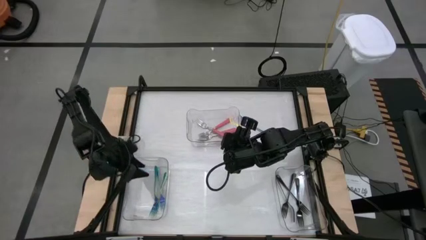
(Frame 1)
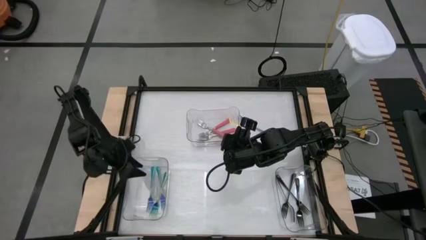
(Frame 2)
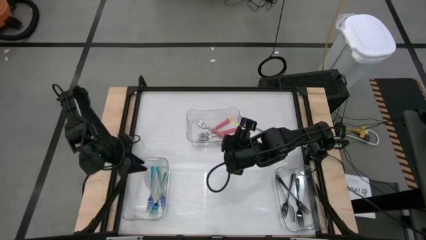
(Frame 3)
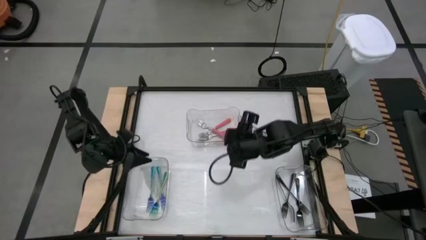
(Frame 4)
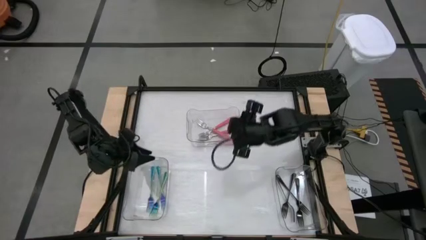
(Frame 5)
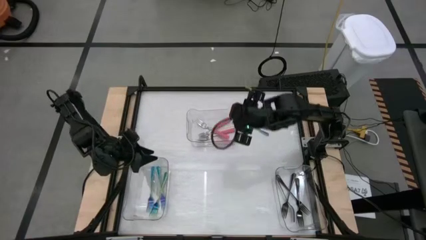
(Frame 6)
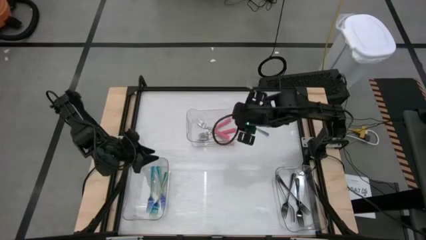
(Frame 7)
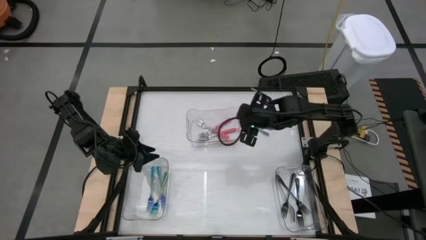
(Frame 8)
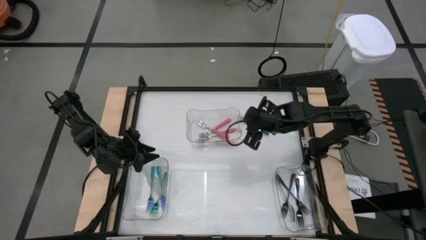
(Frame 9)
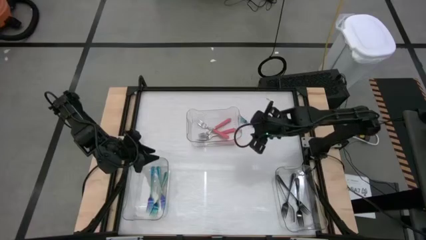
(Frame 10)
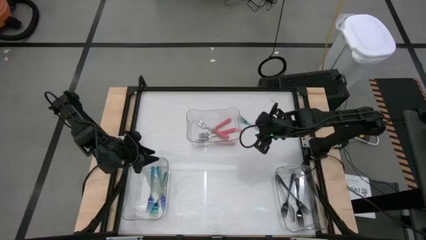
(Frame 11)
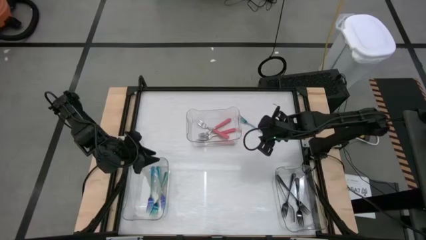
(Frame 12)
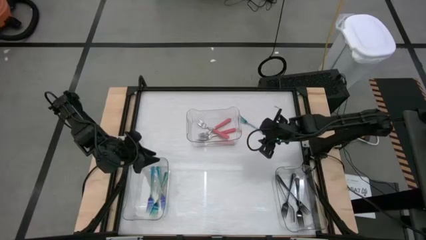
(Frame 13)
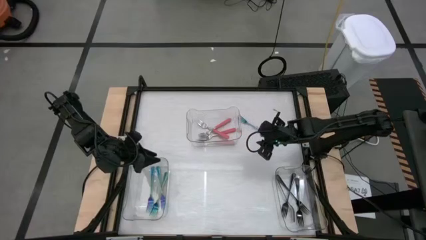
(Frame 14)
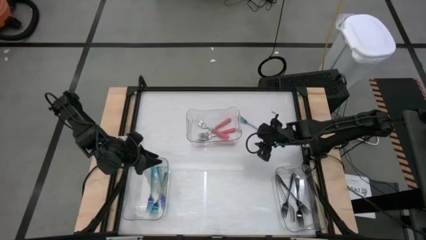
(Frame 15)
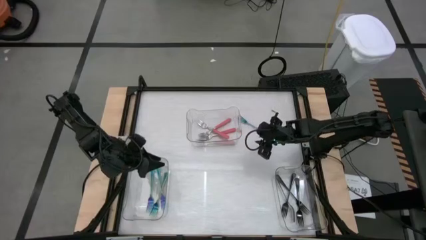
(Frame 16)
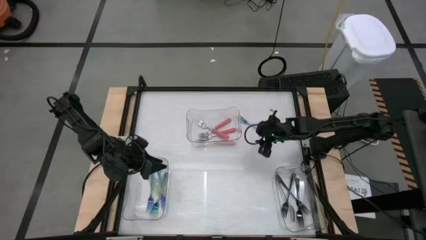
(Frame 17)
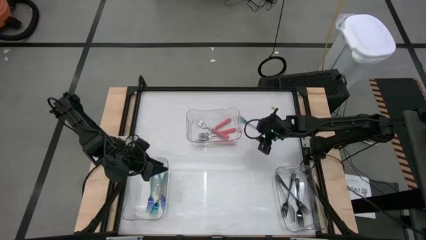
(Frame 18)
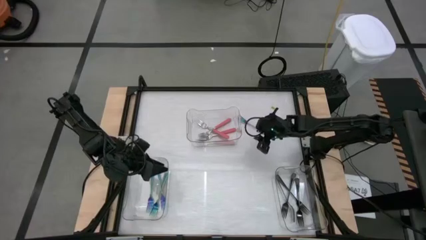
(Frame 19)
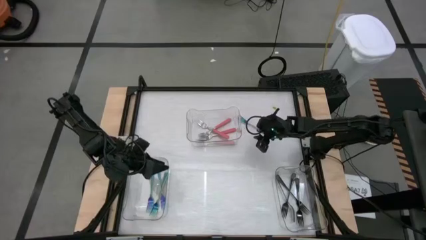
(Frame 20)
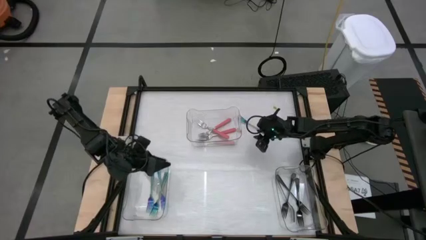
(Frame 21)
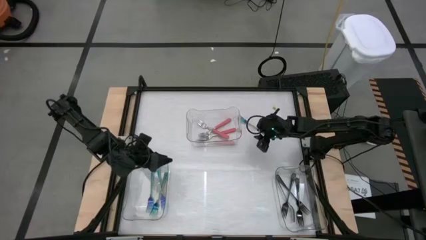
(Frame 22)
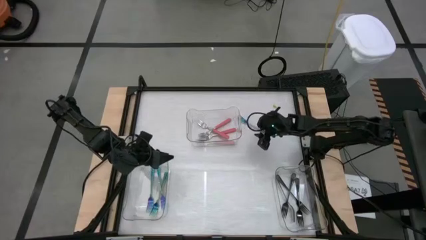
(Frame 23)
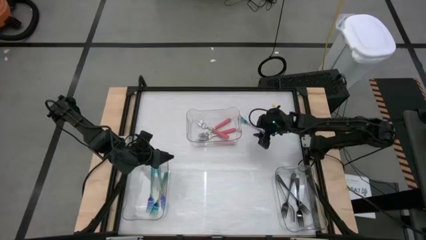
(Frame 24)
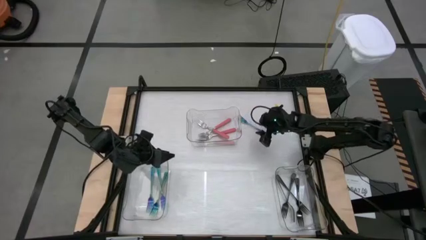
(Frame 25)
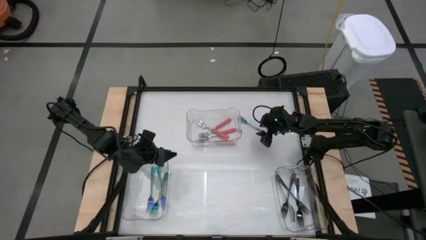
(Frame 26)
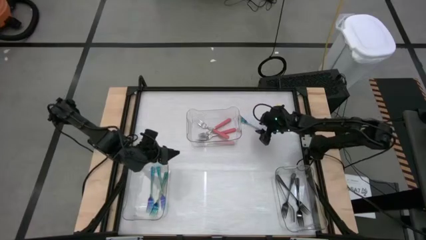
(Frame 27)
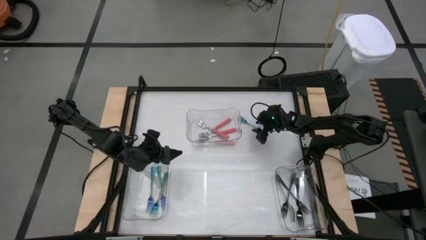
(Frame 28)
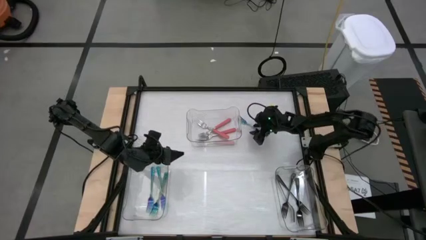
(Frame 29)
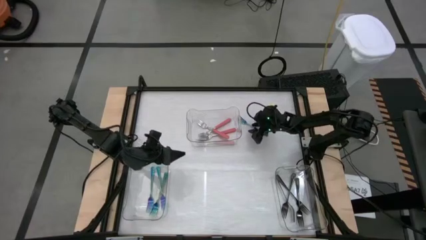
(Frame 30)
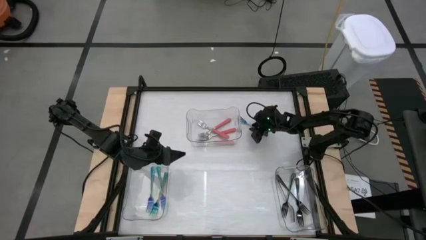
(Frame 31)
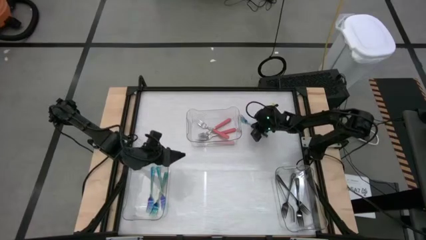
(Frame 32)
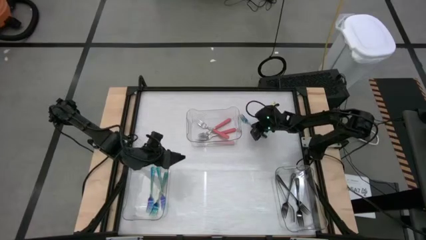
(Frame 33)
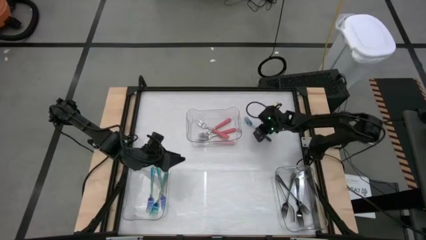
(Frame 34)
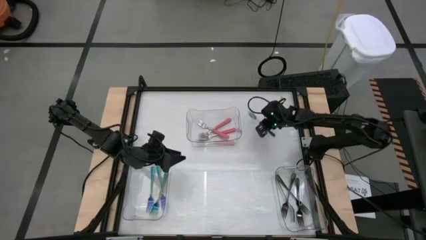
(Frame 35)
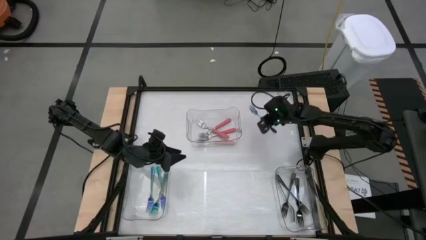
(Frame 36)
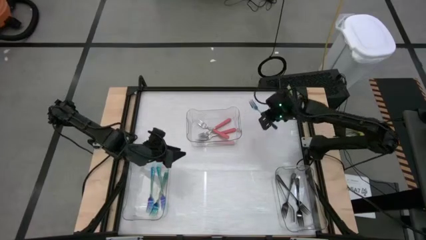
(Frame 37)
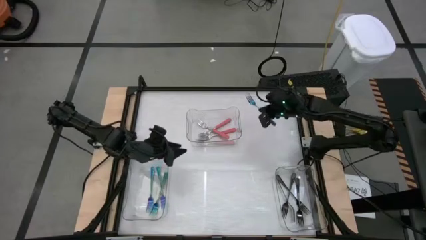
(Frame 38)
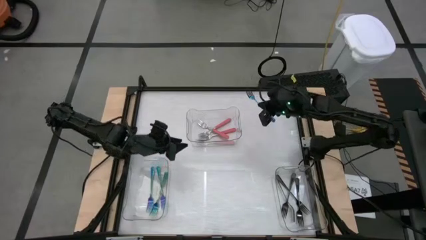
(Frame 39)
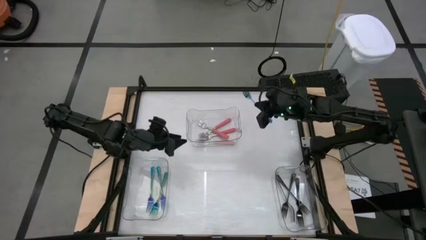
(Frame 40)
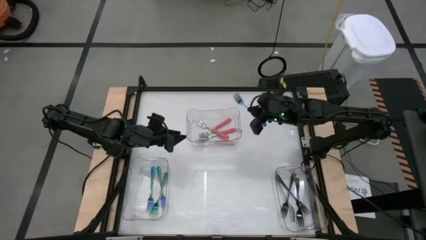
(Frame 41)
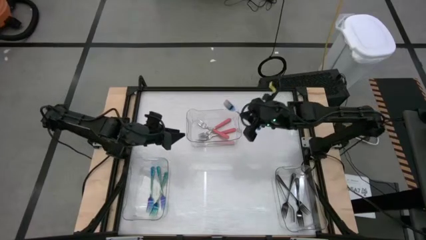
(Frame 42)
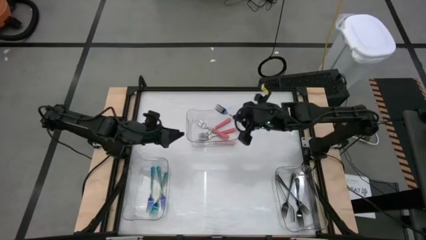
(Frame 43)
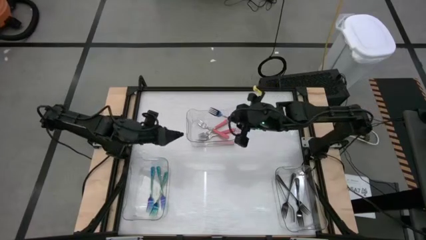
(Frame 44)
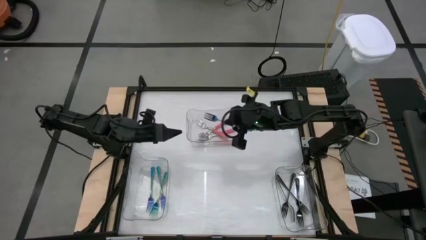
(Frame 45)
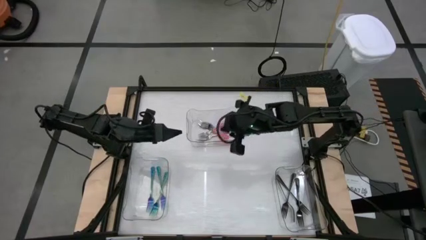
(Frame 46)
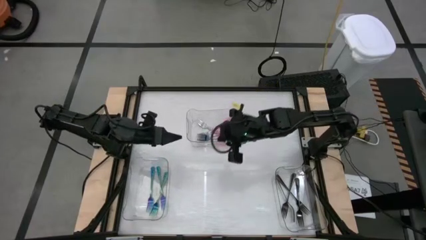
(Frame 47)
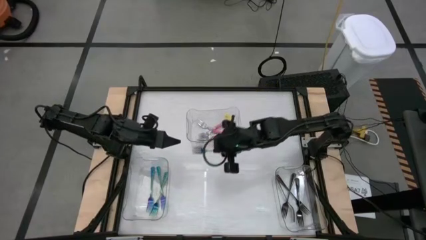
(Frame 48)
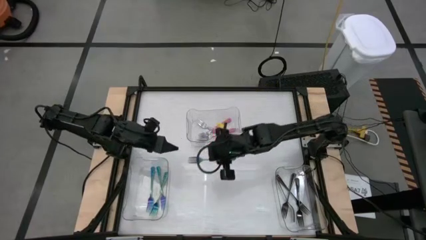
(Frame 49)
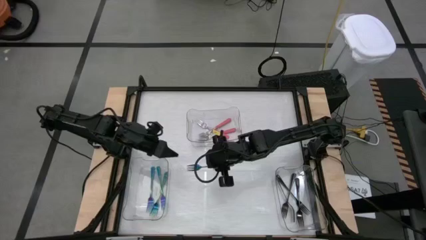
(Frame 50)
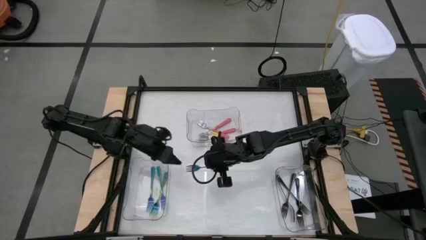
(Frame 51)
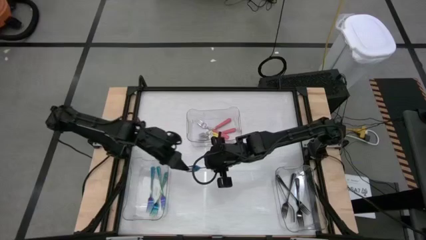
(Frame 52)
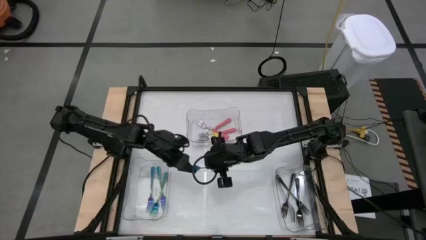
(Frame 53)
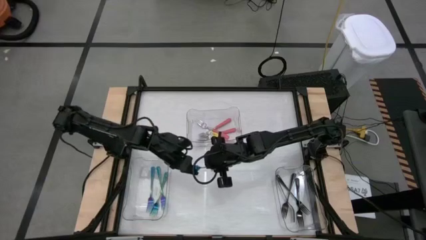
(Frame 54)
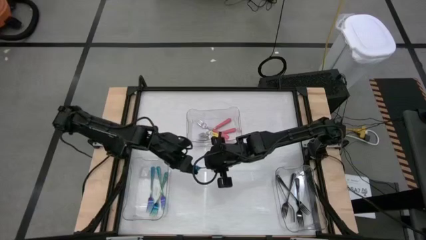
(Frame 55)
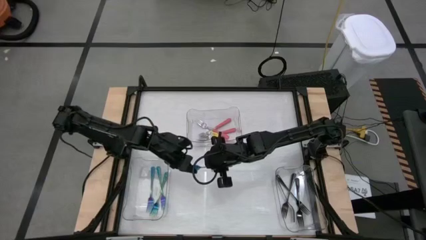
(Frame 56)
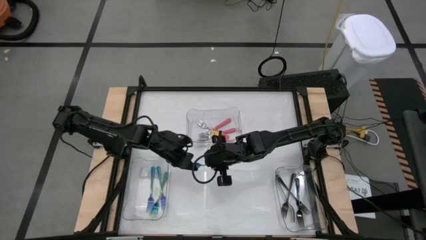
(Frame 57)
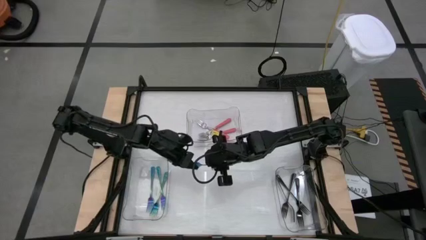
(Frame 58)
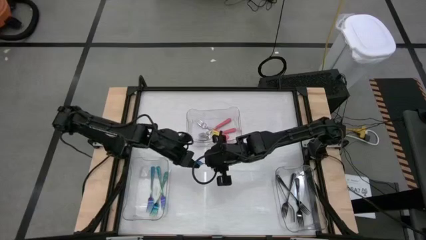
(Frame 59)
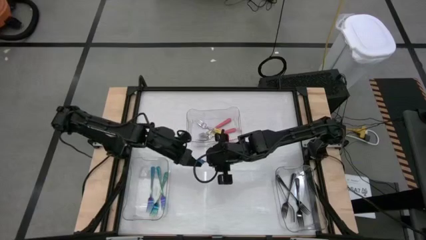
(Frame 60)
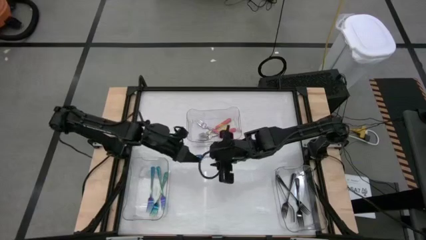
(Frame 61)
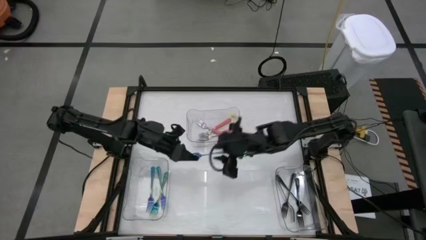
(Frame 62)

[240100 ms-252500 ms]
Task: Sort silverware by color (type)
Put the blue fork into the left transparent bin
